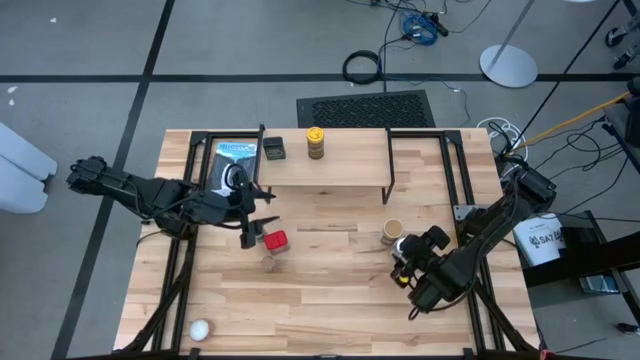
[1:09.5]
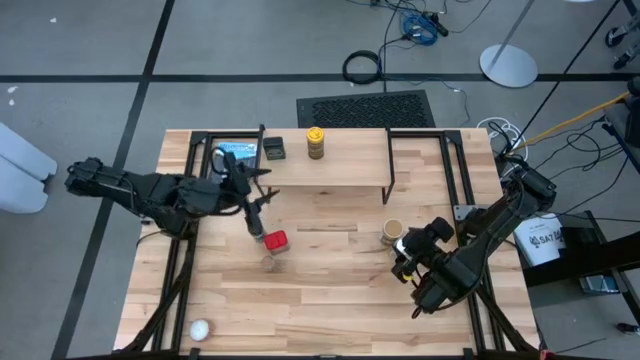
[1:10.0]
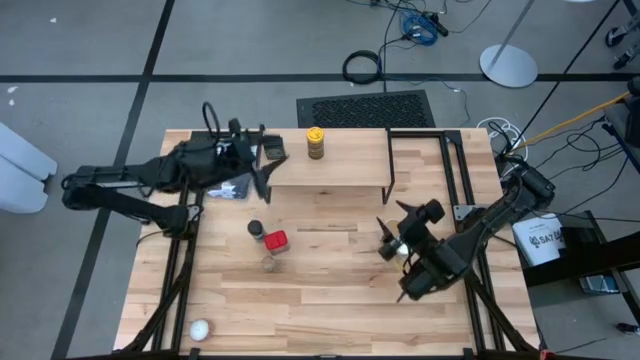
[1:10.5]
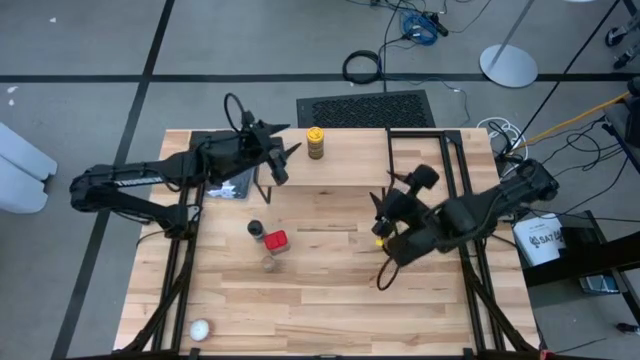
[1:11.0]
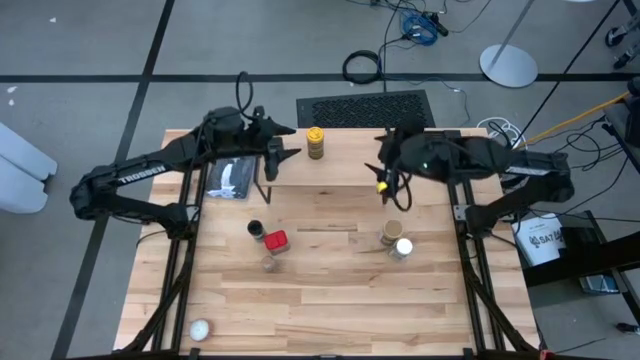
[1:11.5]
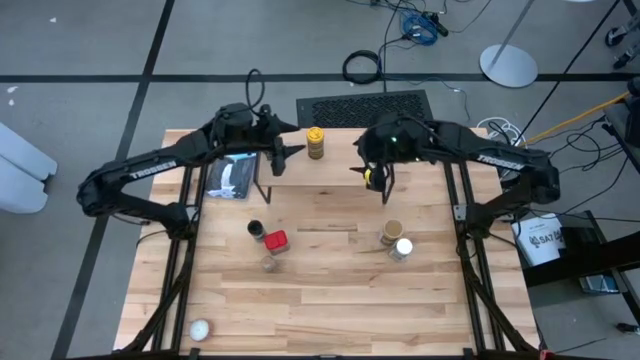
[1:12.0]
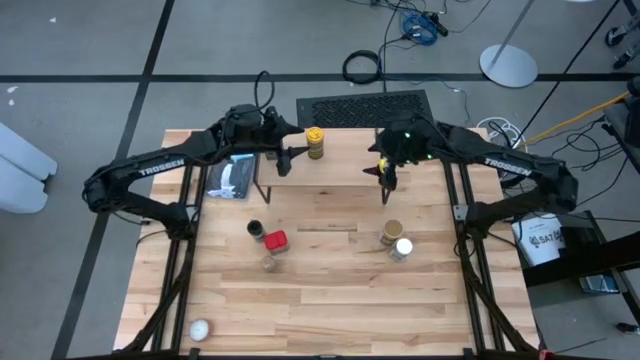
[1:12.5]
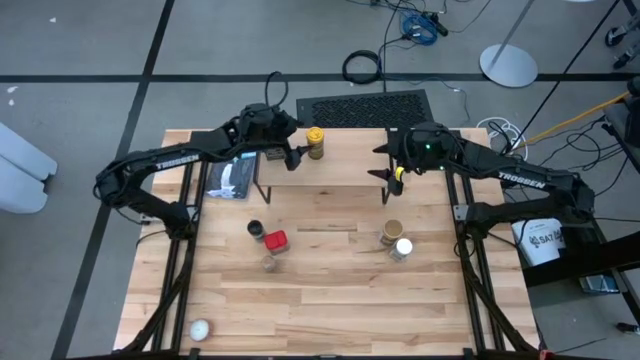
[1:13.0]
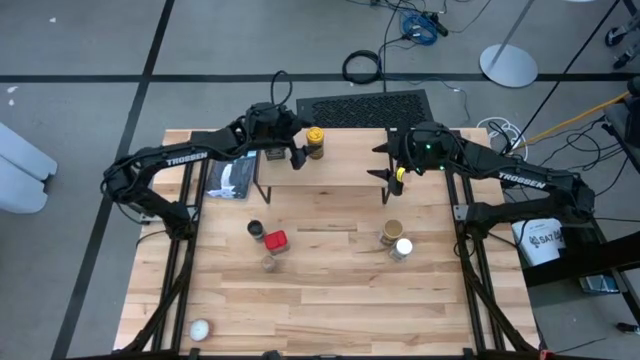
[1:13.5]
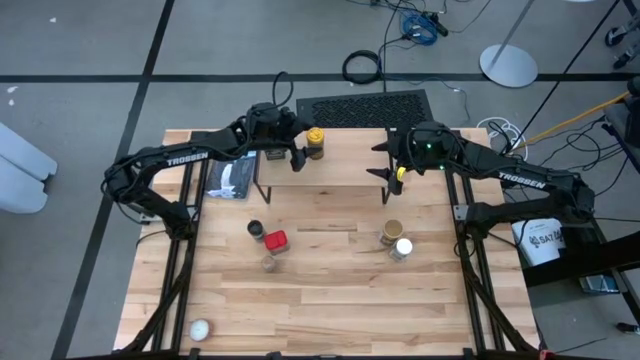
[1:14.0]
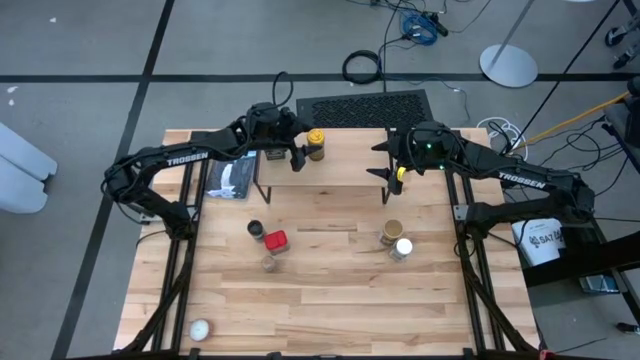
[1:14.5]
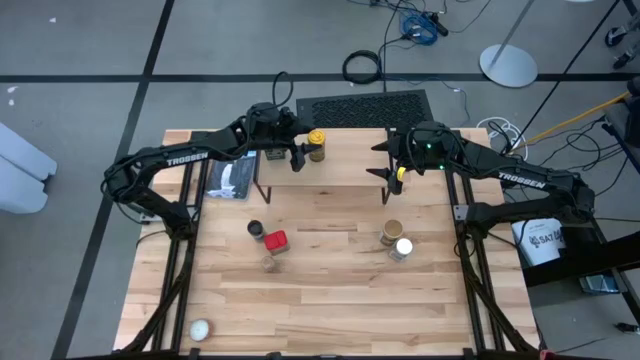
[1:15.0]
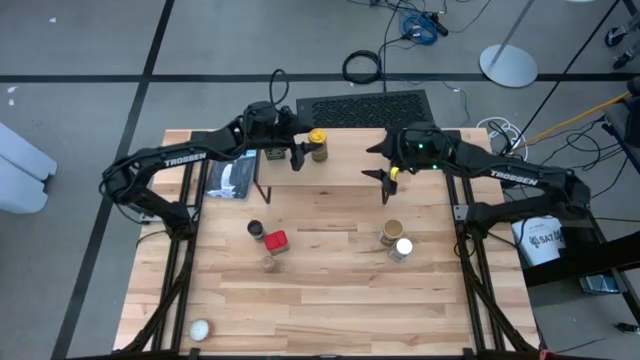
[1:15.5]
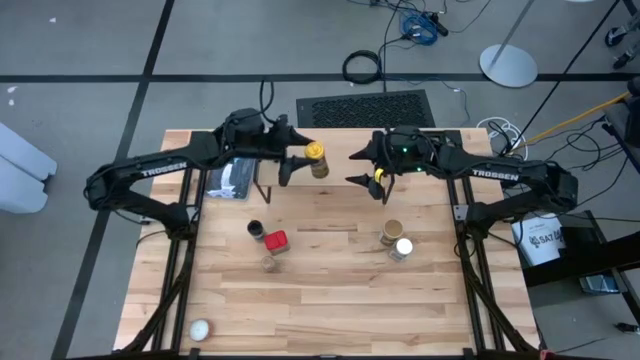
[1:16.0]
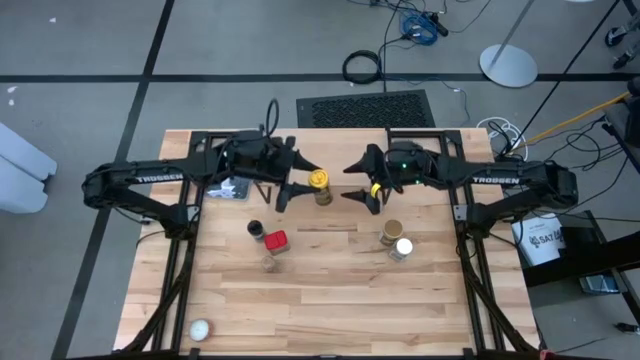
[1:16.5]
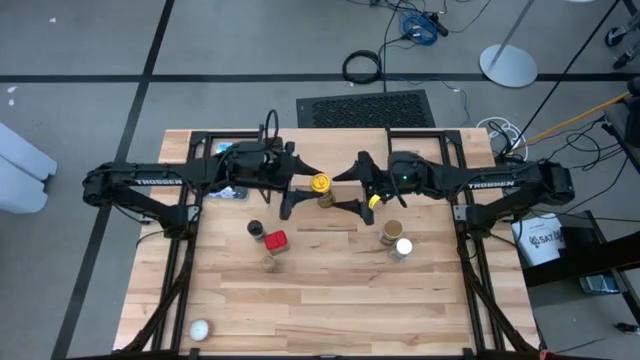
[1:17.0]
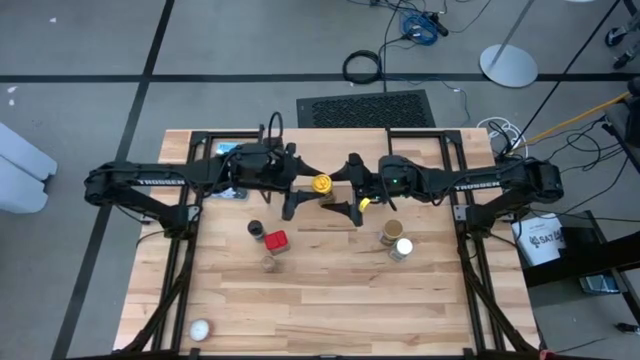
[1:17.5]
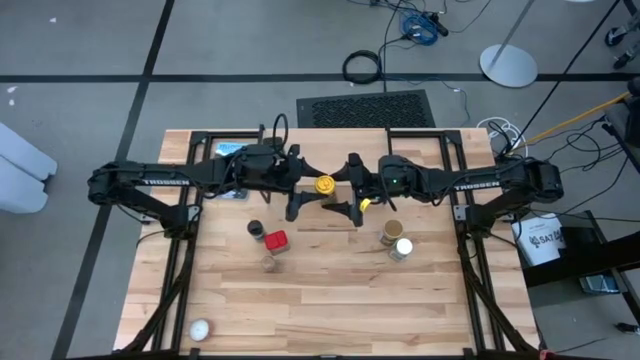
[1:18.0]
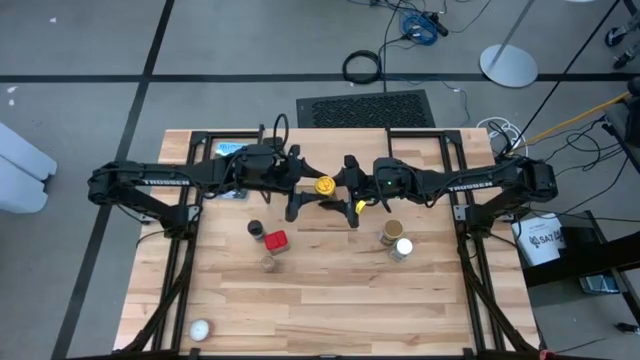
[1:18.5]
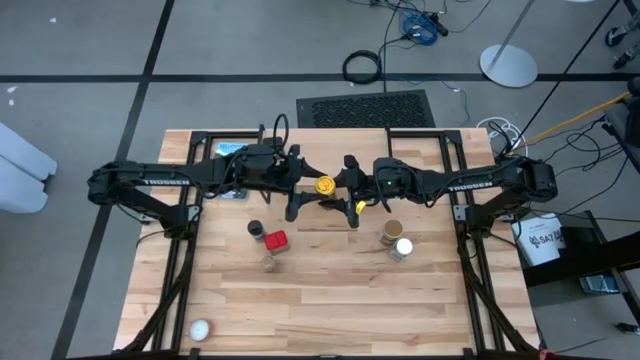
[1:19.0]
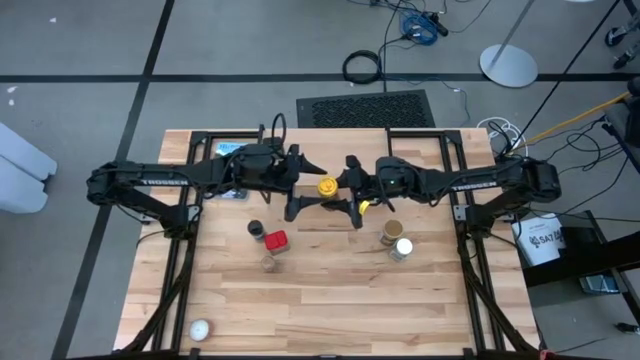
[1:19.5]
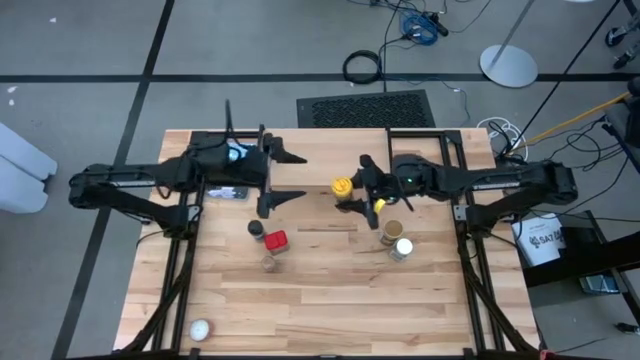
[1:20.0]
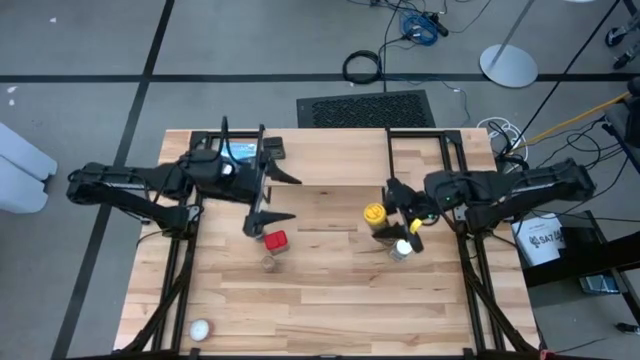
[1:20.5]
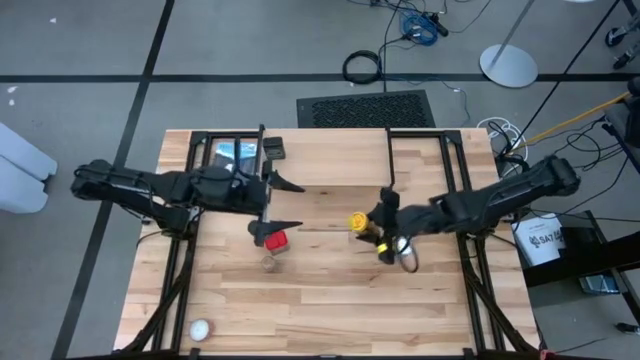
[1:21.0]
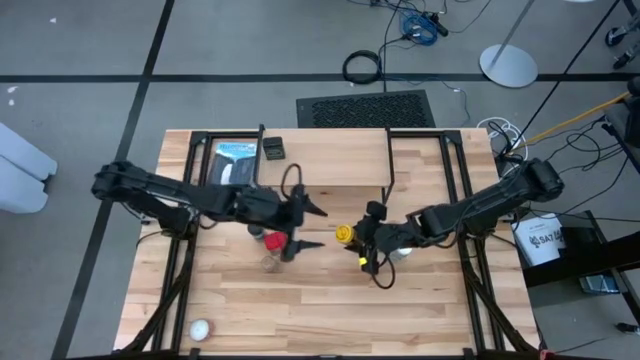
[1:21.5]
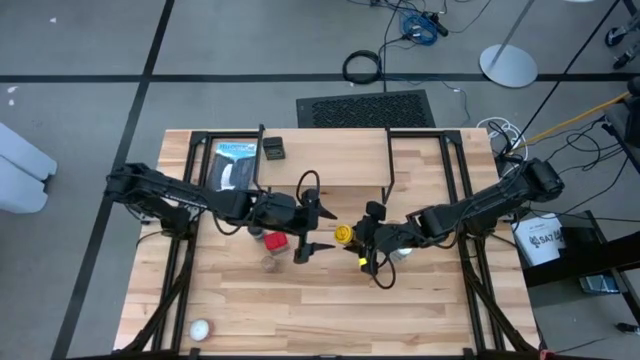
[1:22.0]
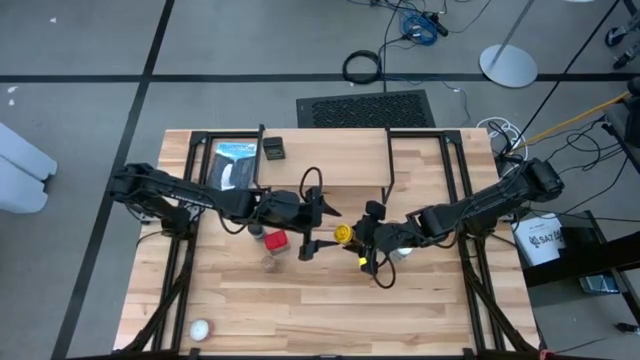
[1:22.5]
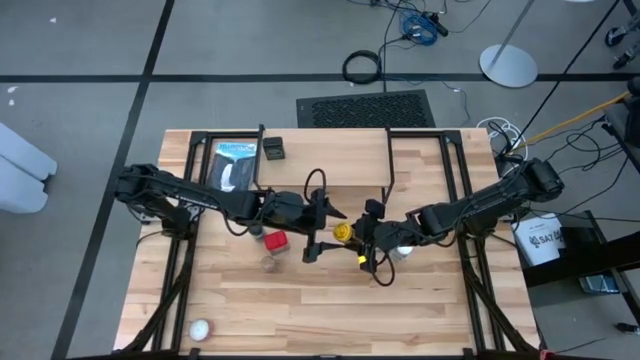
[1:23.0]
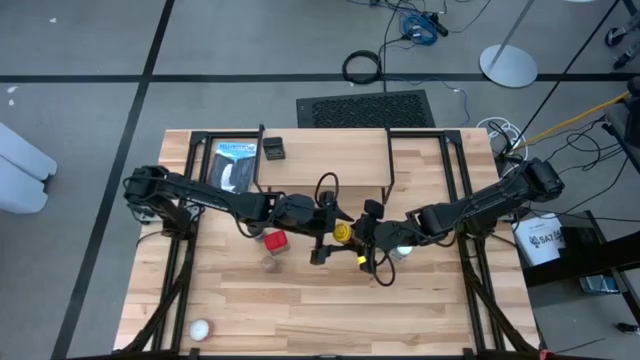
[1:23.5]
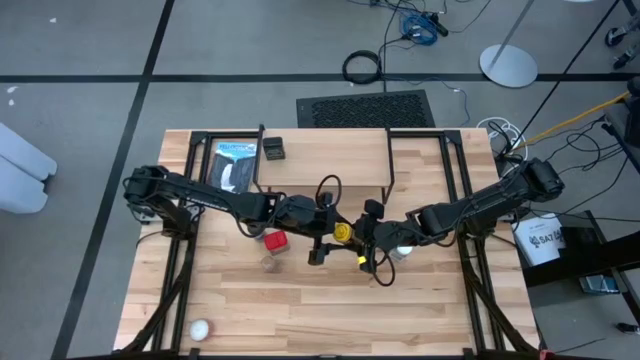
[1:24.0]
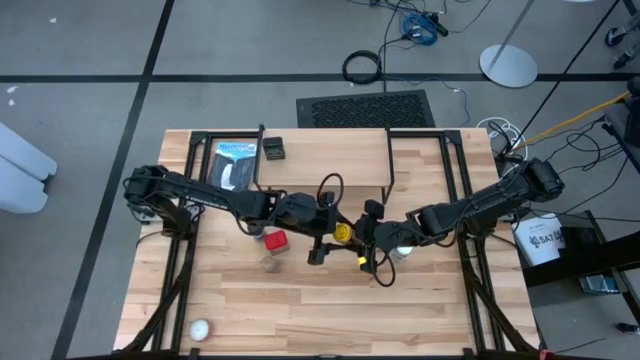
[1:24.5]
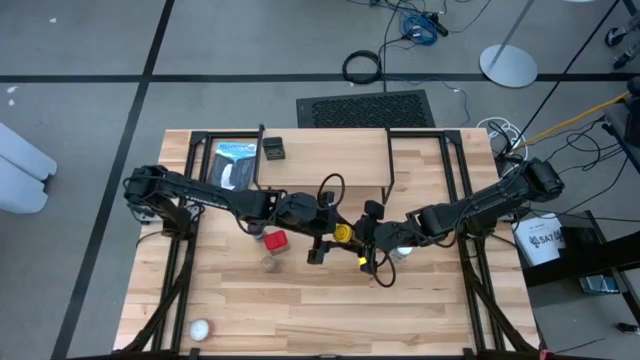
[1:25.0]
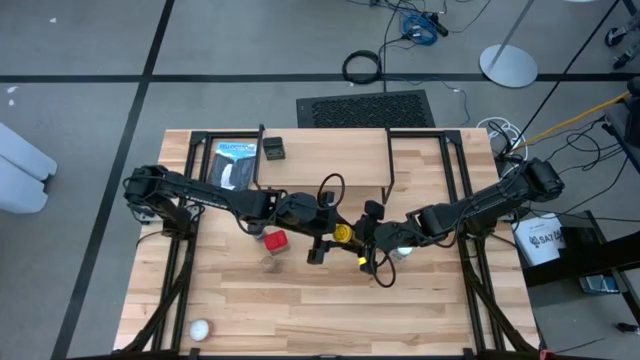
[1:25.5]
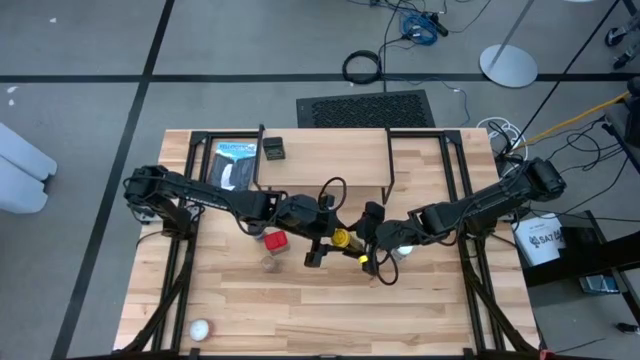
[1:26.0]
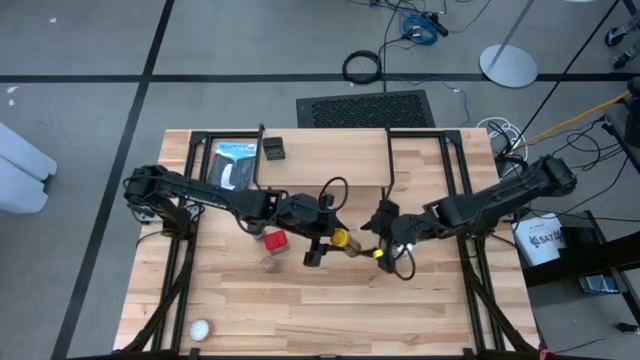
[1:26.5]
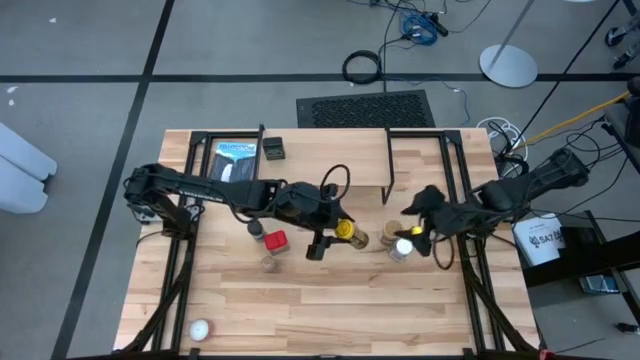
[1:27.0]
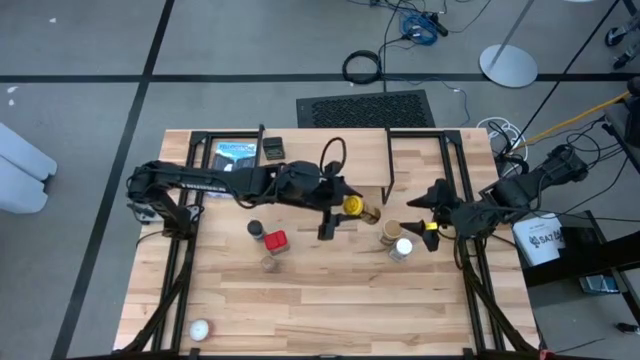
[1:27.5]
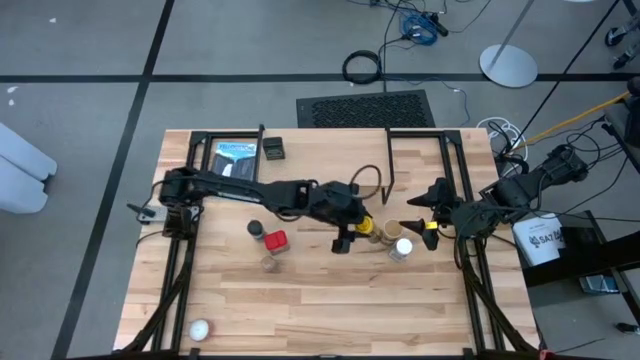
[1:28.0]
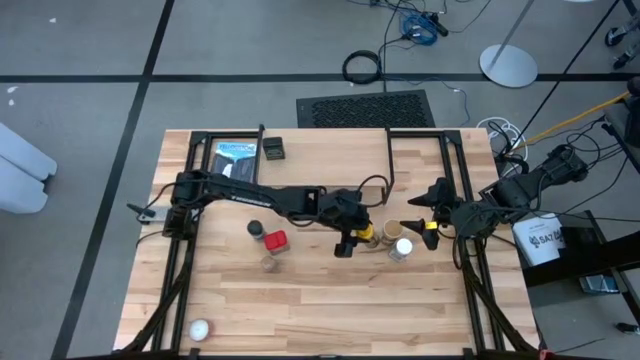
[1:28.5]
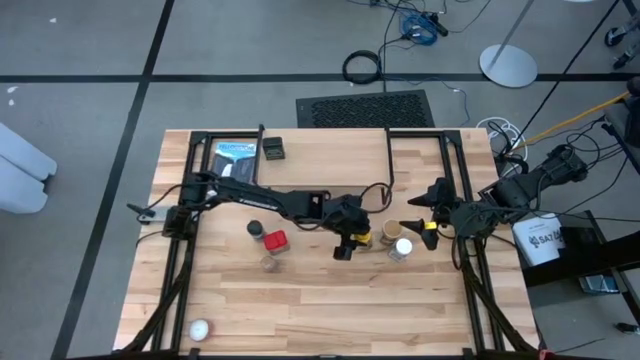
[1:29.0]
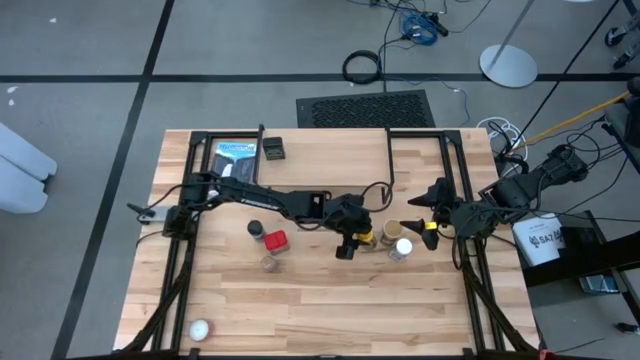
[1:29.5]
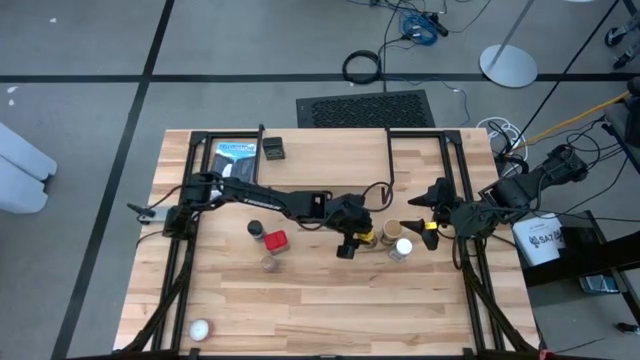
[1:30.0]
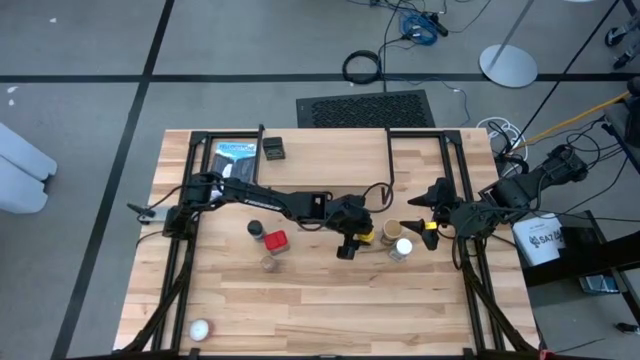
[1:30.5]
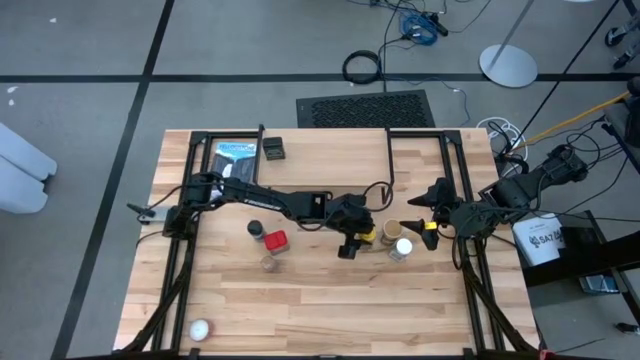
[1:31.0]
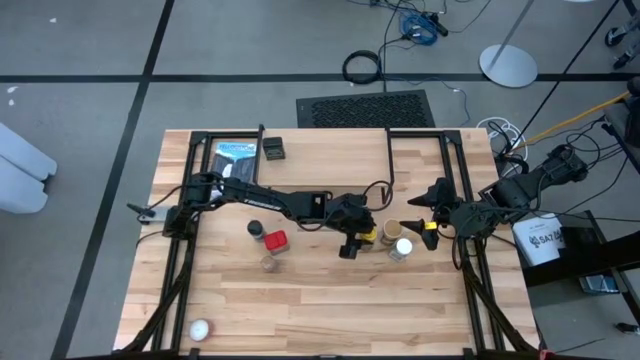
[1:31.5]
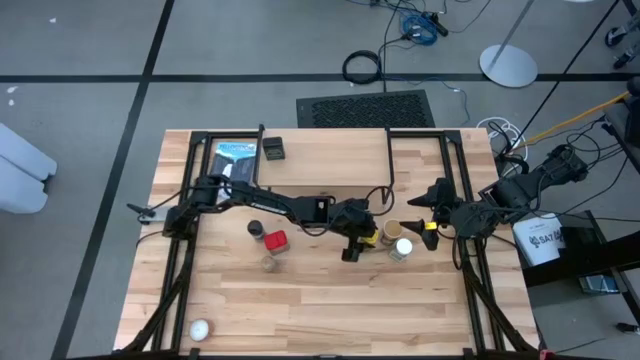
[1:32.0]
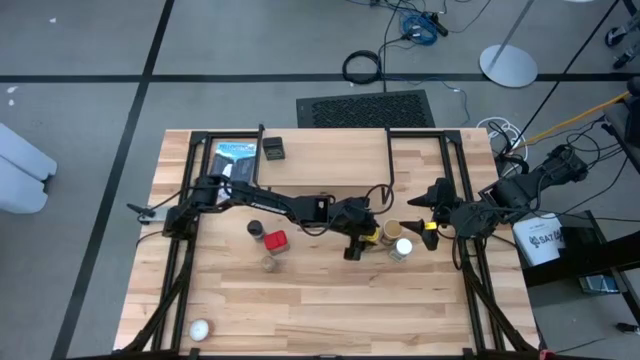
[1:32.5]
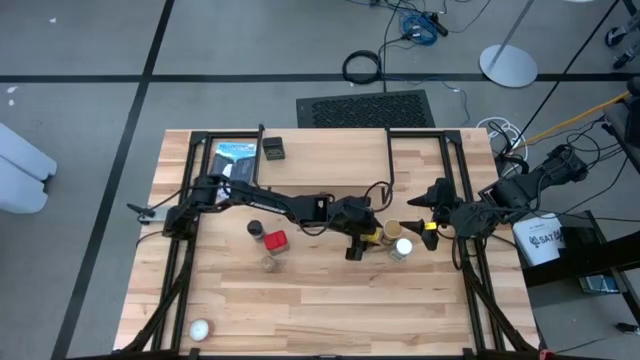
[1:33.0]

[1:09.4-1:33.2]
Task: Shelf spices
Remove the yellow seasoning bottle from the shelf
